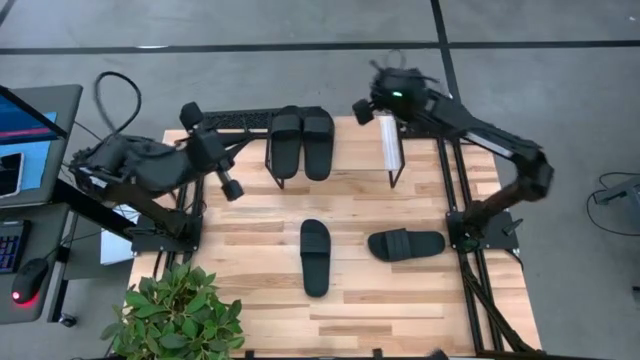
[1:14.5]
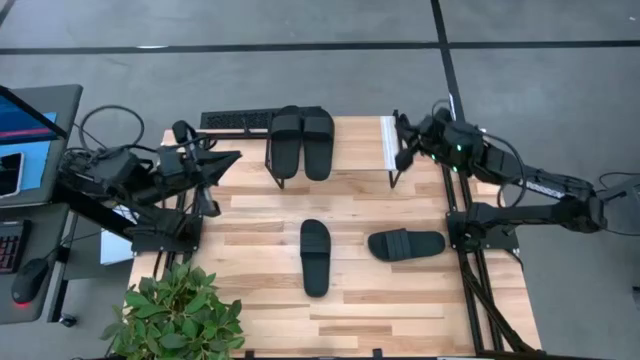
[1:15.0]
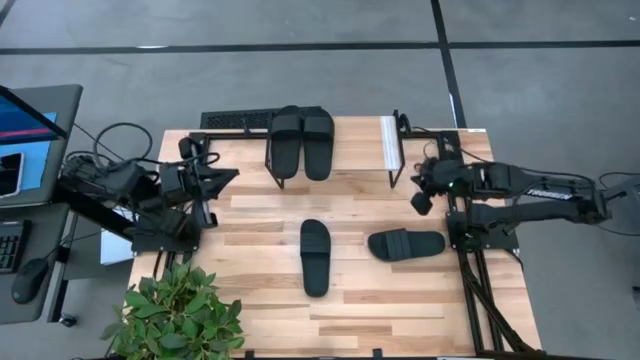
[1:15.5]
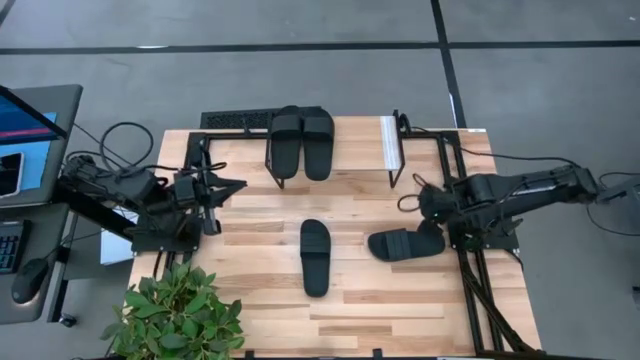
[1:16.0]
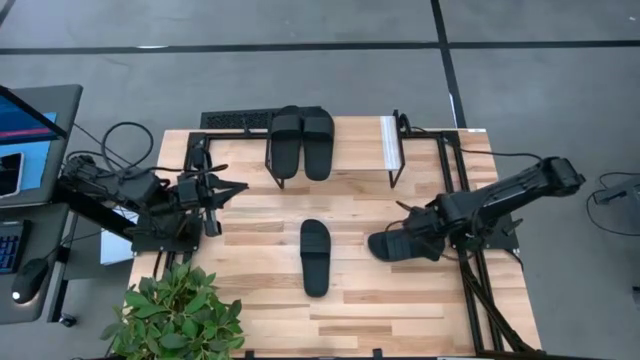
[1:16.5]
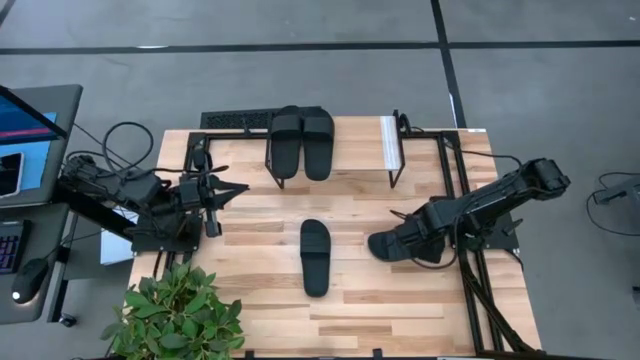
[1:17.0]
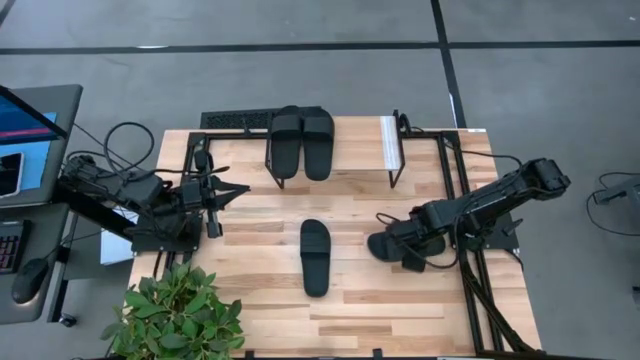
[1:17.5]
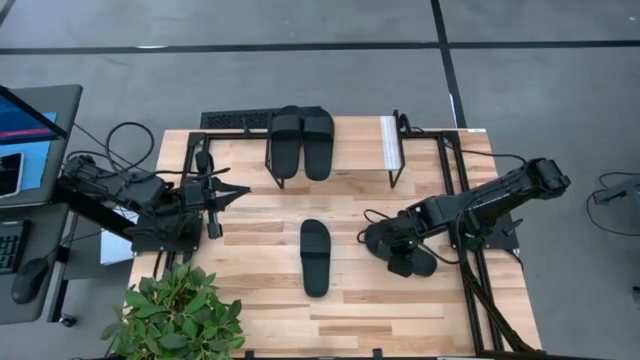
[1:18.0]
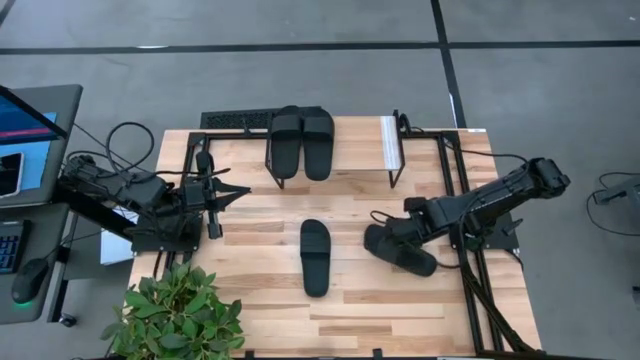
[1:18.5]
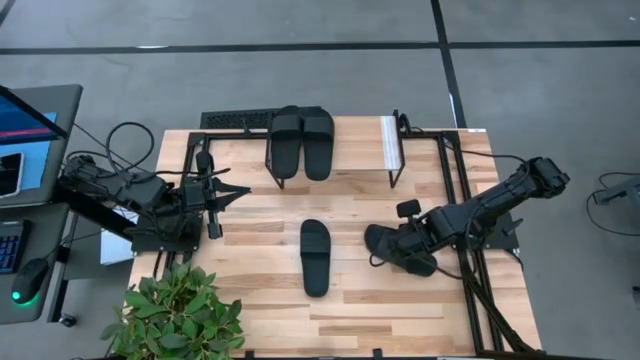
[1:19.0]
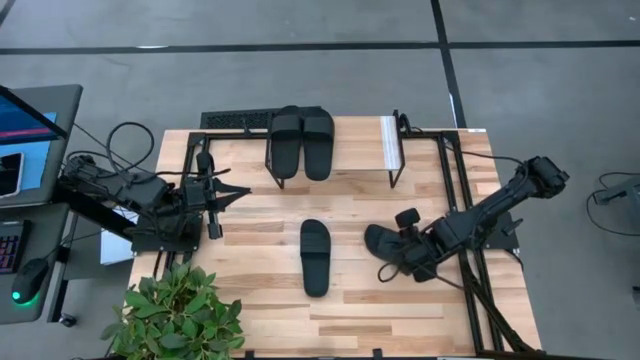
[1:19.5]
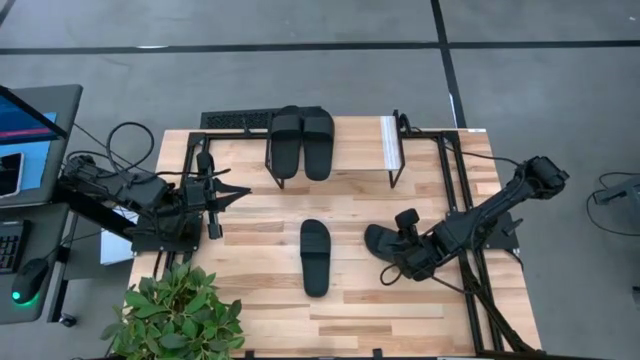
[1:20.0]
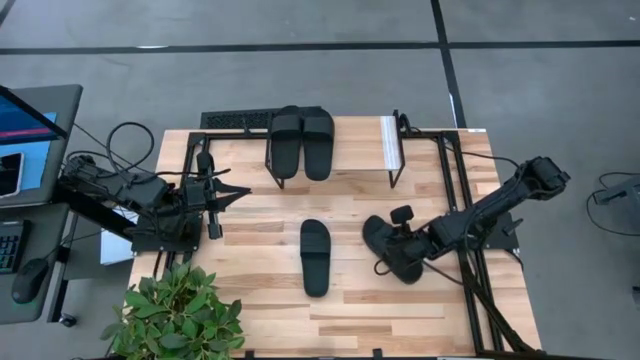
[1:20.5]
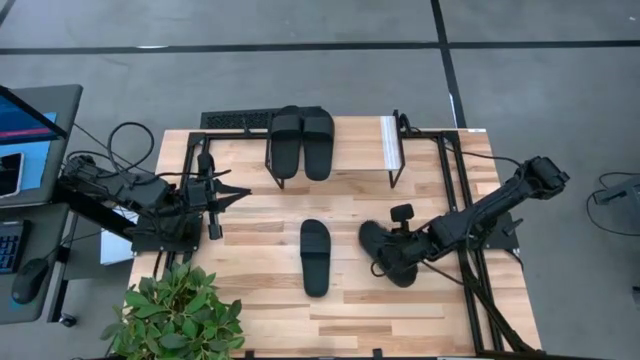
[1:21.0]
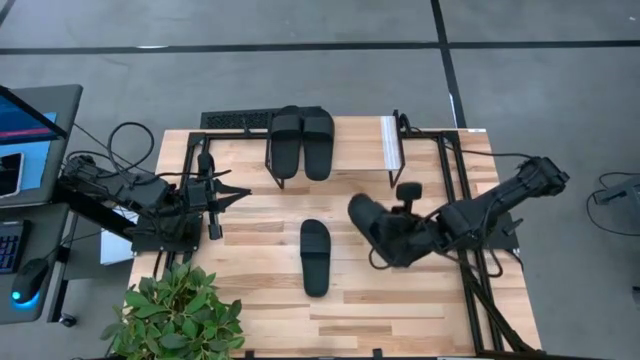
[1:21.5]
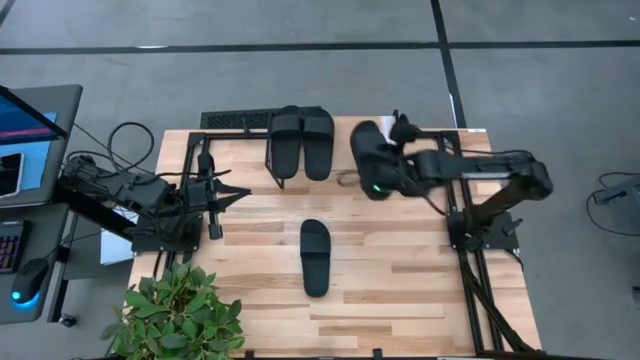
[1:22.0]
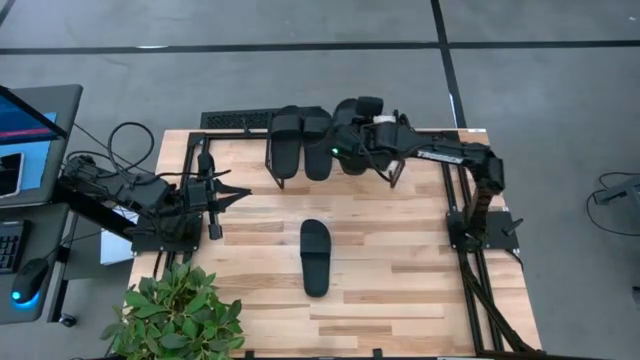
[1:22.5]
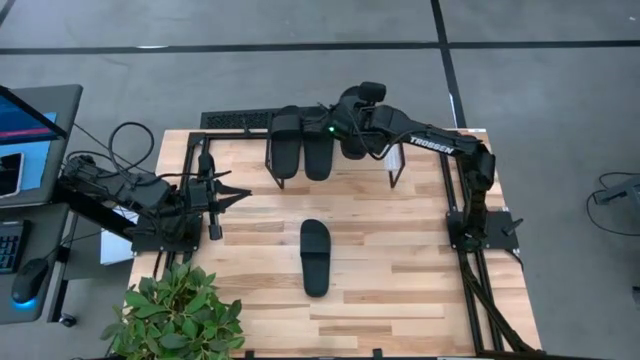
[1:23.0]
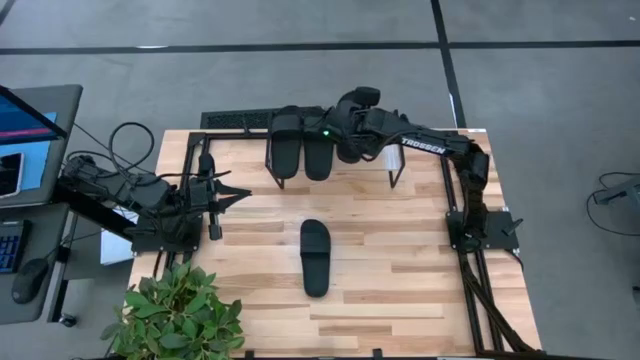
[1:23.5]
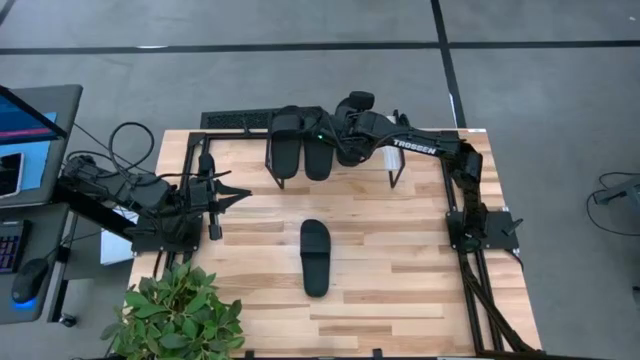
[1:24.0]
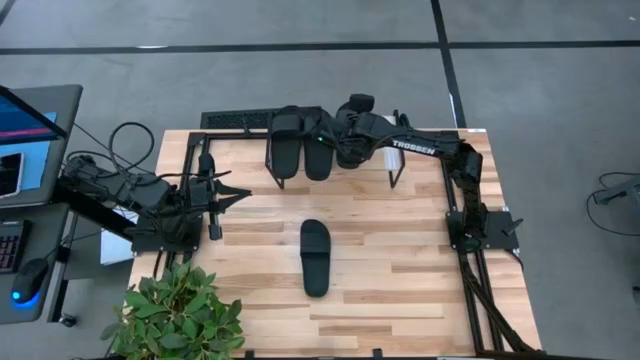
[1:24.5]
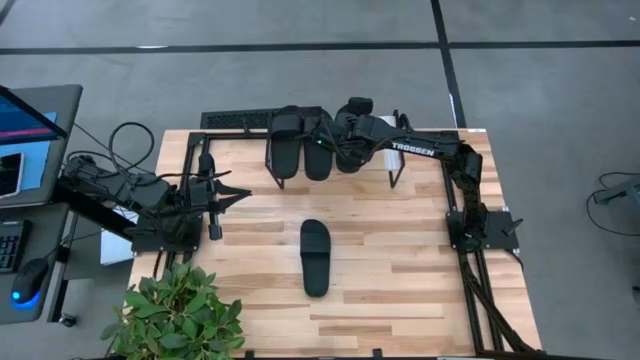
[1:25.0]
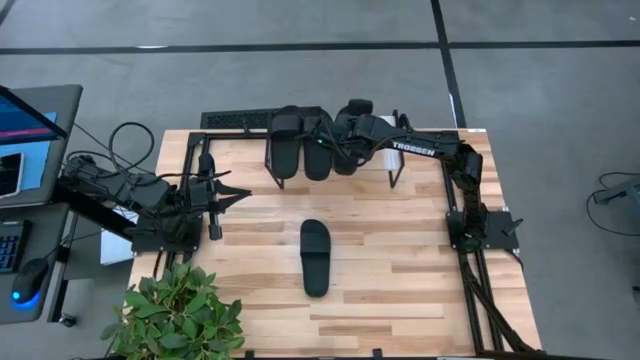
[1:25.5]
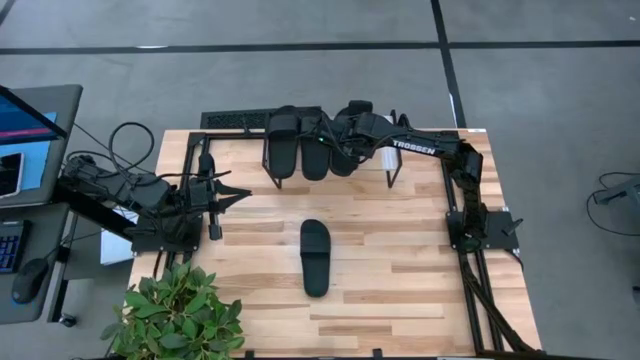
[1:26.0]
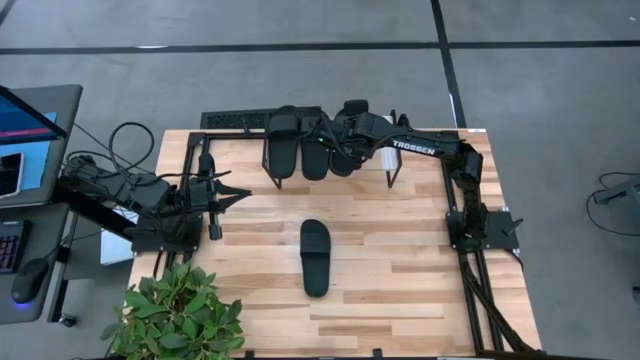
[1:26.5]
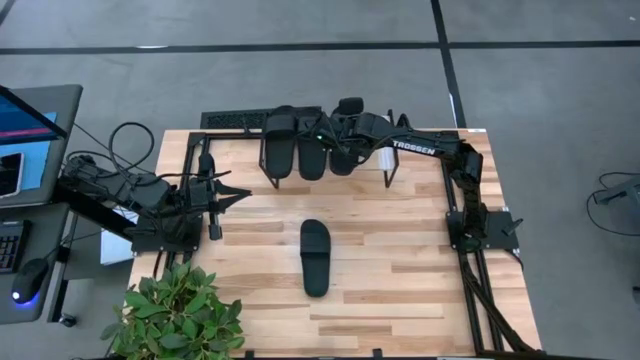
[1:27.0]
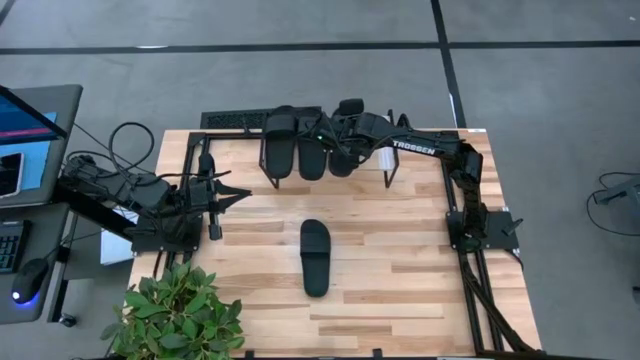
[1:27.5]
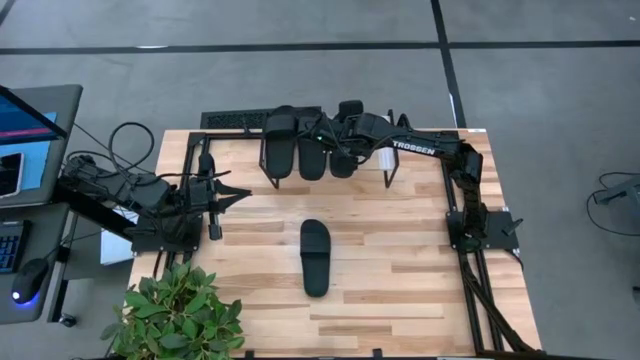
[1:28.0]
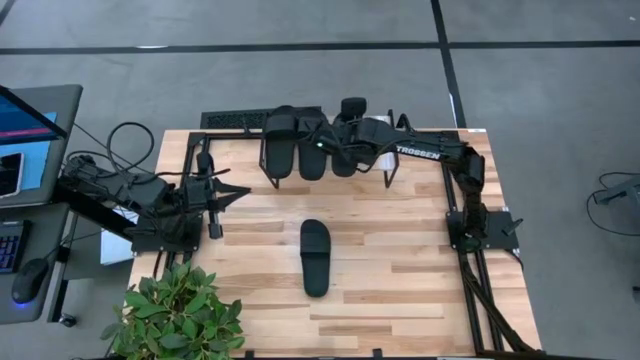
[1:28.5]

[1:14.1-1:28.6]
Task: Pick and place slides into the shelf
Put the black slide on the shelf

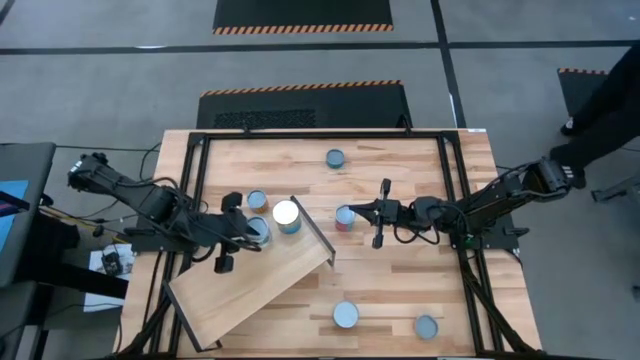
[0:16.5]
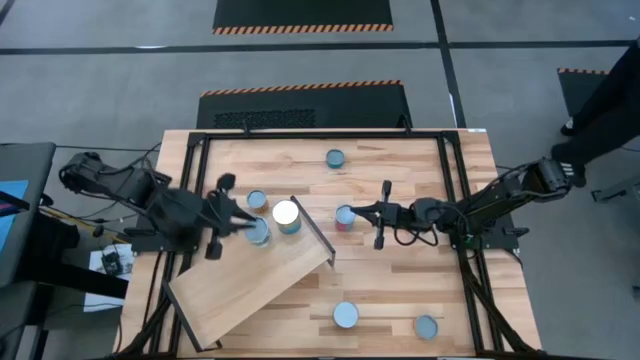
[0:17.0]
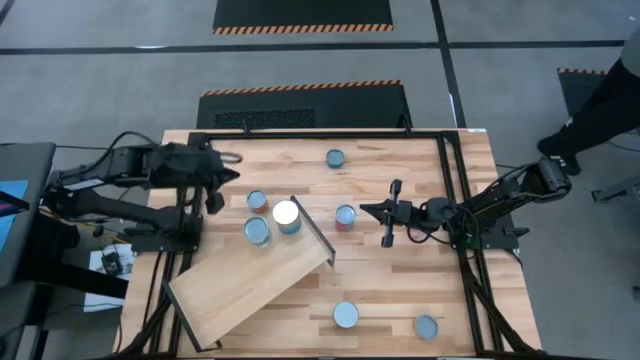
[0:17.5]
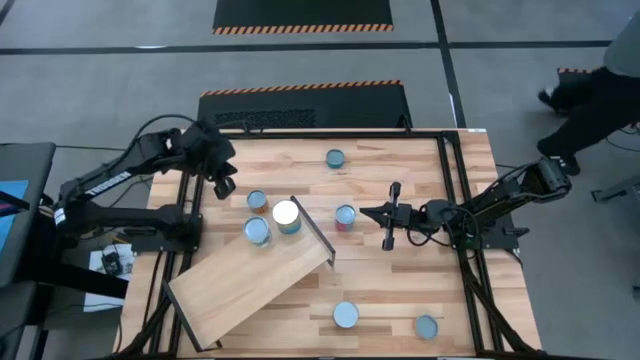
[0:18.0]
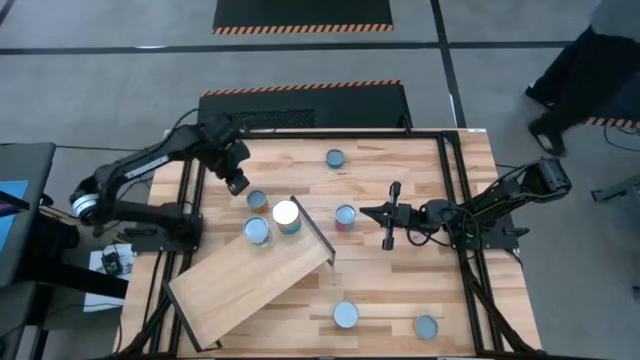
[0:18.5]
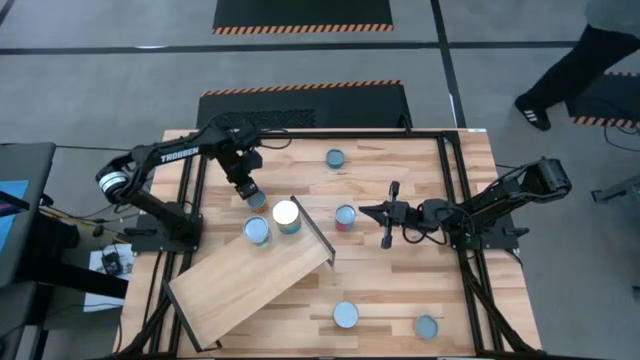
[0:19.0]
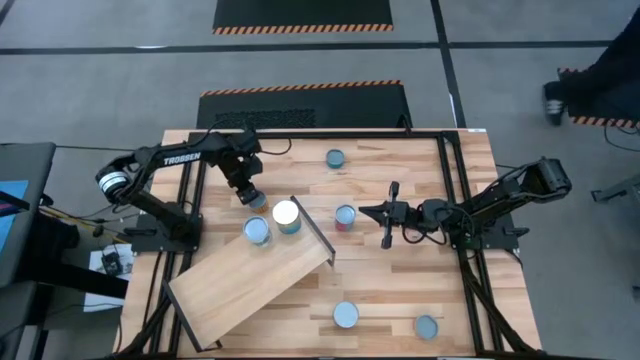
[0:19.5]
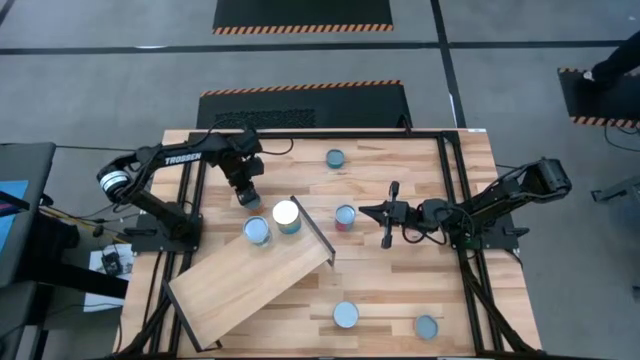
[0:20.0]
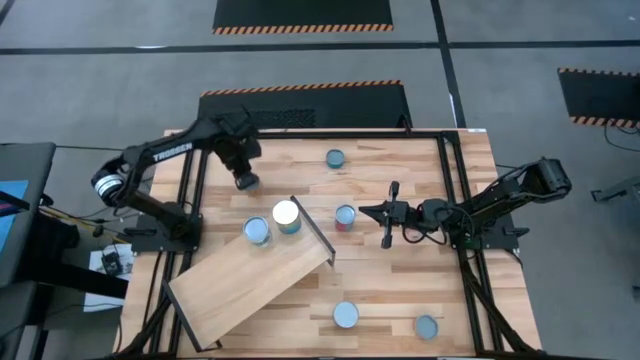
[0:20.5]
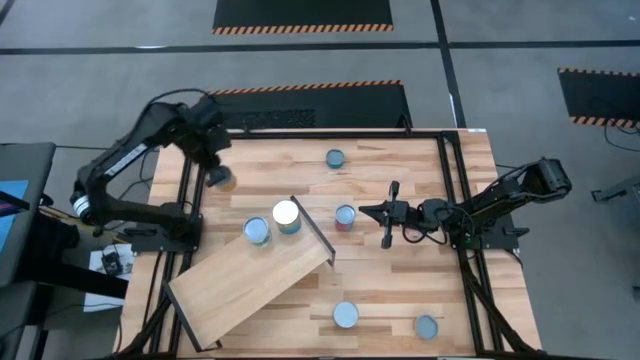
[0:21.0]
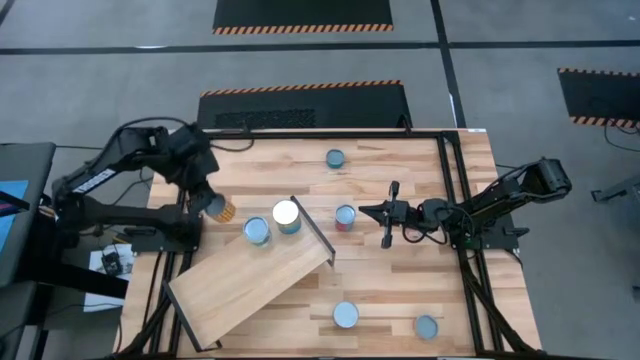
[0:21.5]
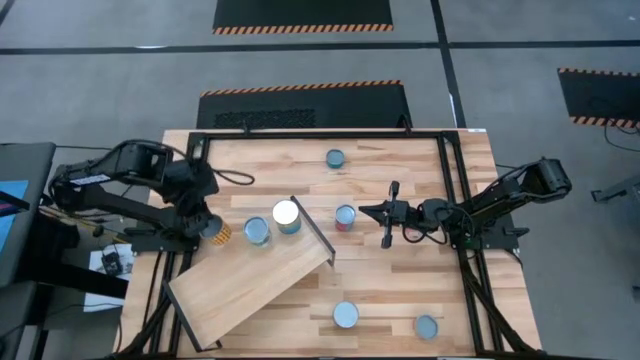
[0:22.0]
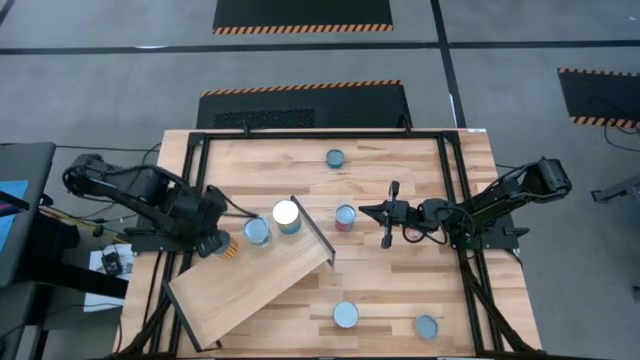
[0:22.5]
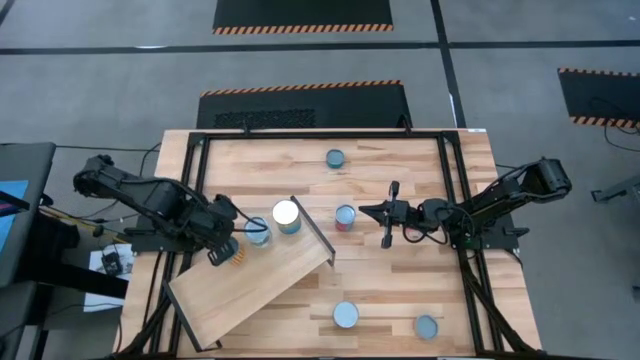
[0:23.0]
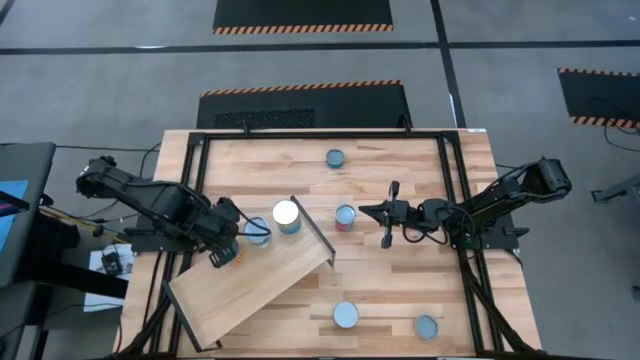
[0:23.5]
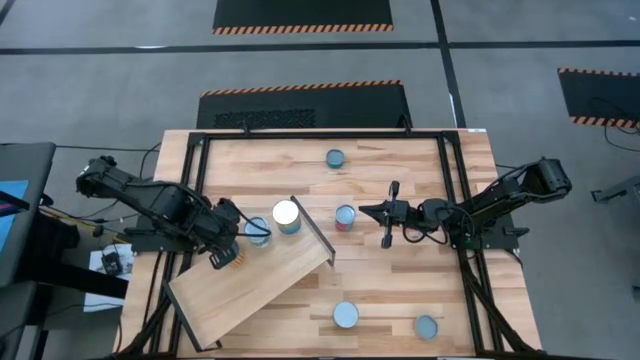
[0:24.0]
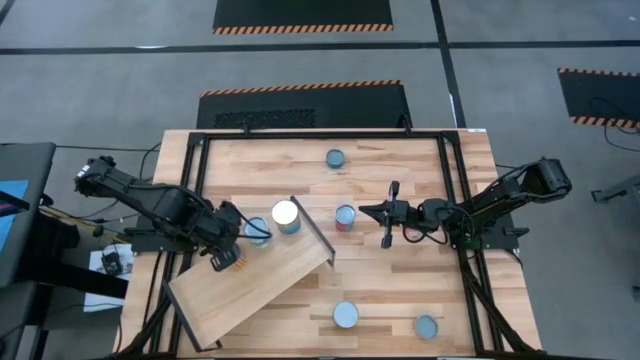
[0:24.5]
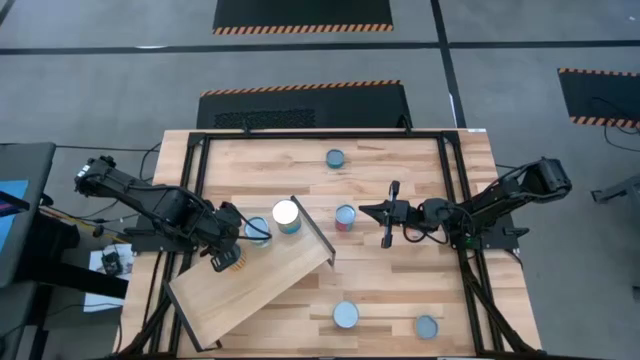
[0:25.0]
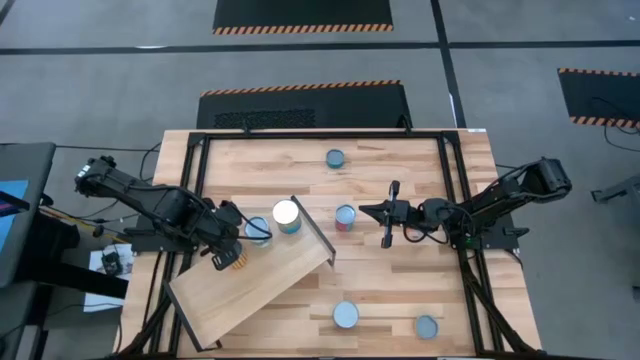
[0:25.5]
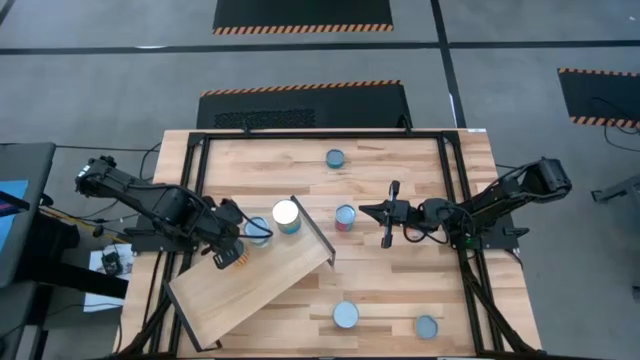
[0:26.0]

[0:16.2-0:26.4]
Task: Pick and place cans onto a shelf
Put the canned beans on the shelf
